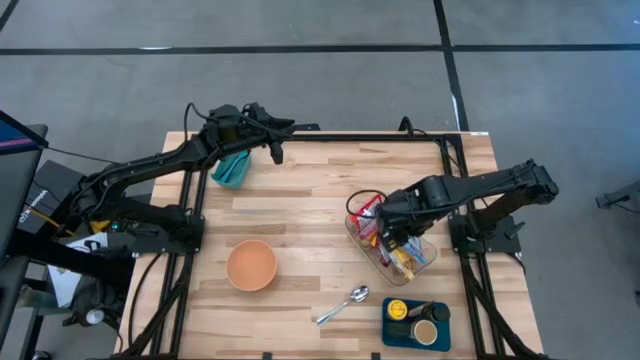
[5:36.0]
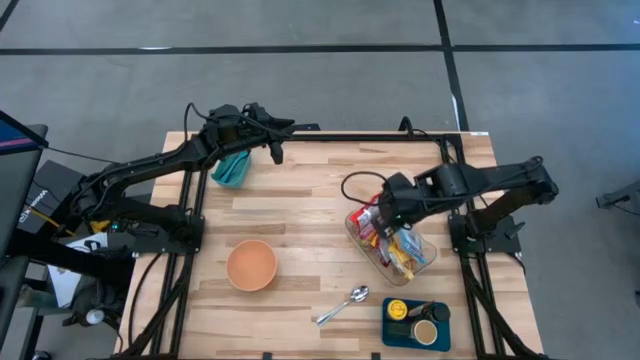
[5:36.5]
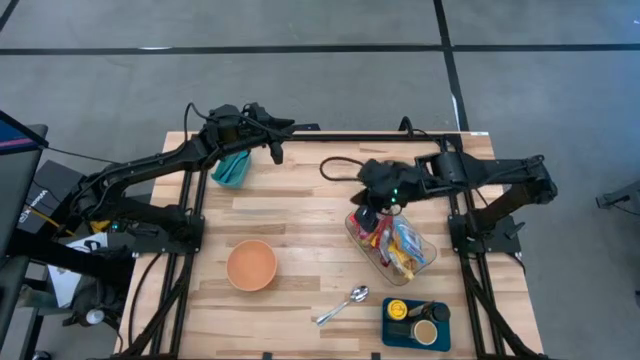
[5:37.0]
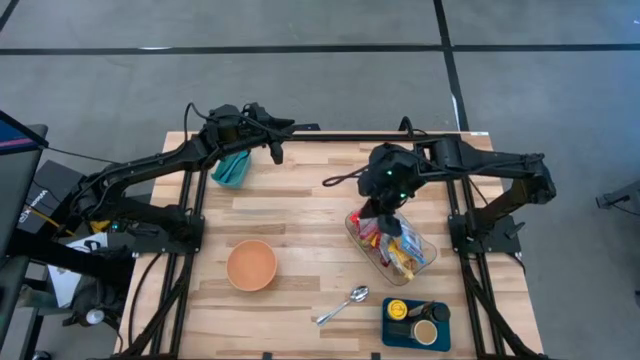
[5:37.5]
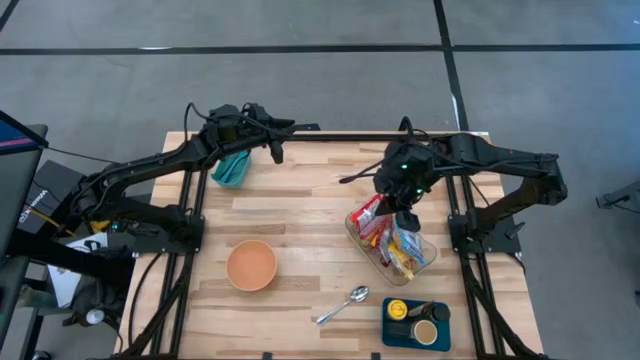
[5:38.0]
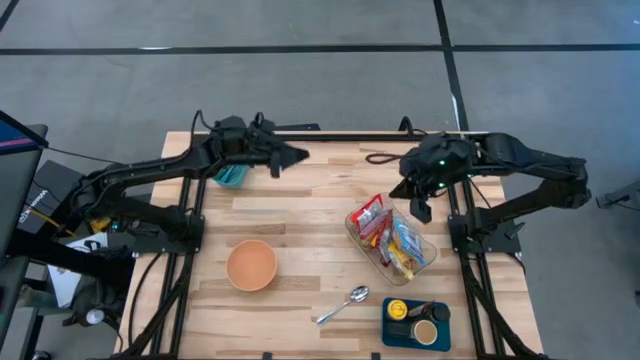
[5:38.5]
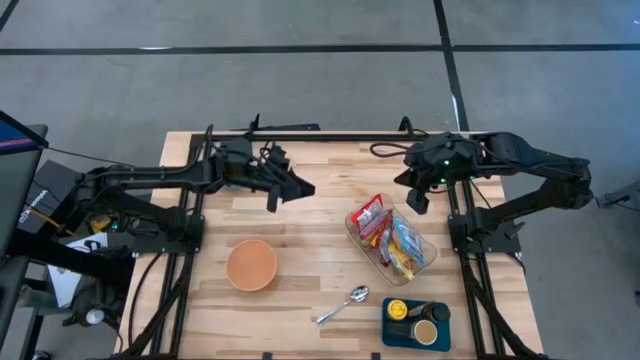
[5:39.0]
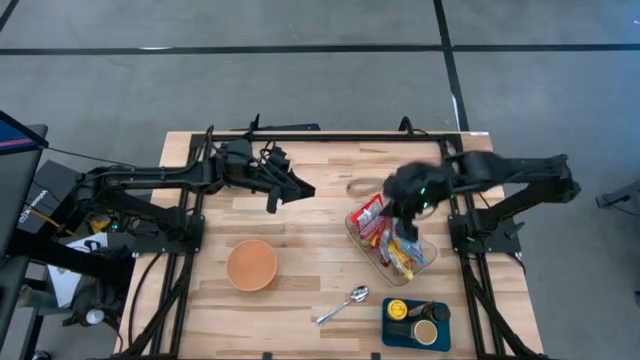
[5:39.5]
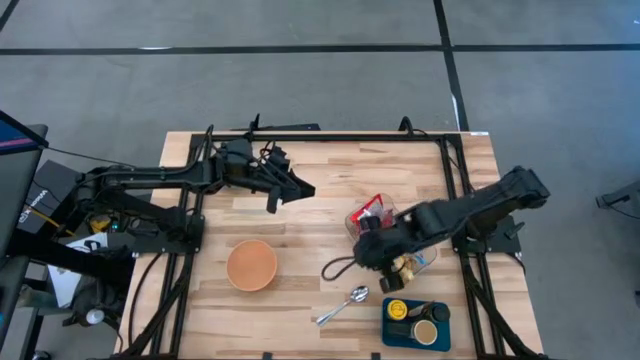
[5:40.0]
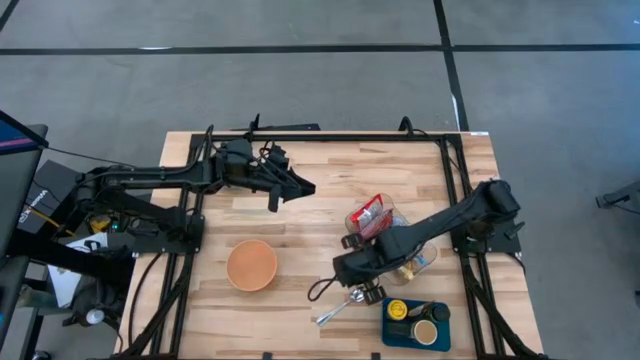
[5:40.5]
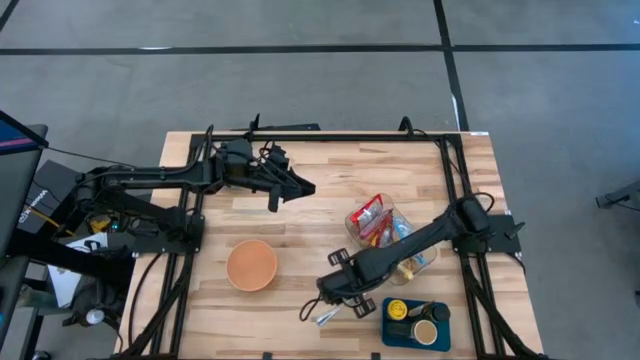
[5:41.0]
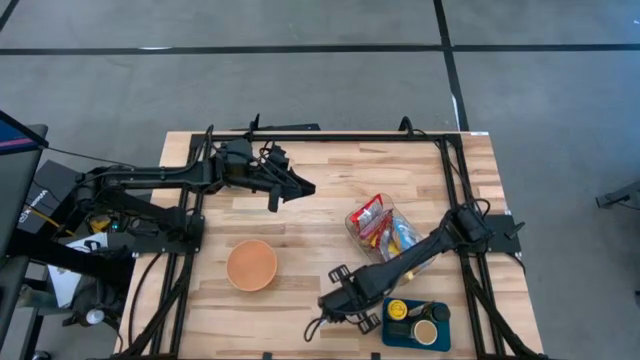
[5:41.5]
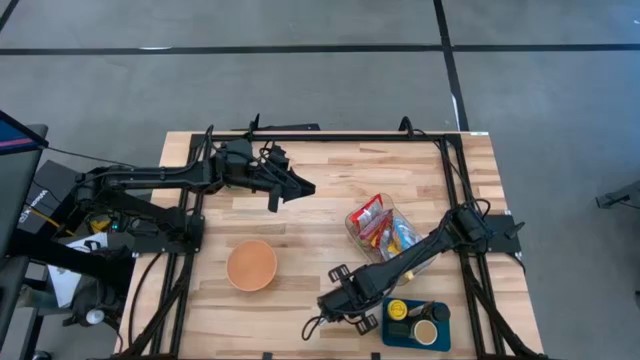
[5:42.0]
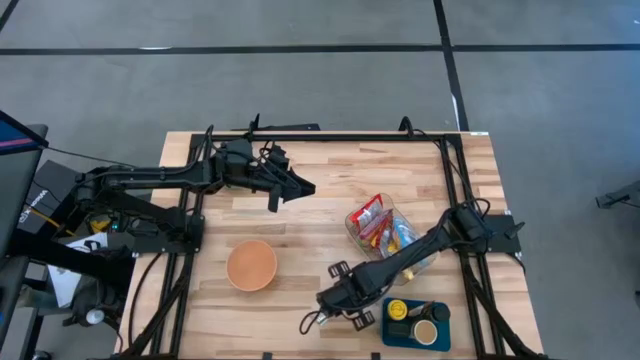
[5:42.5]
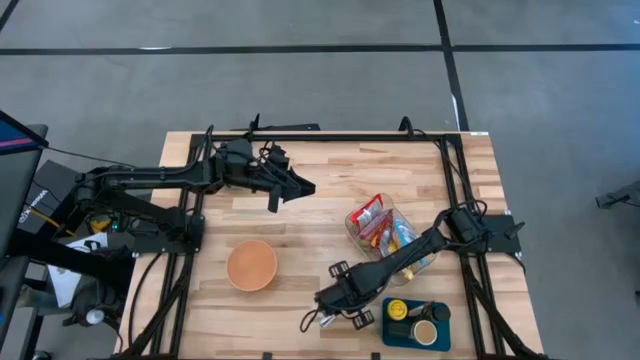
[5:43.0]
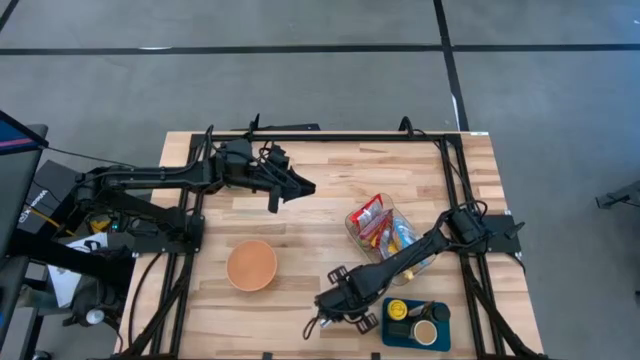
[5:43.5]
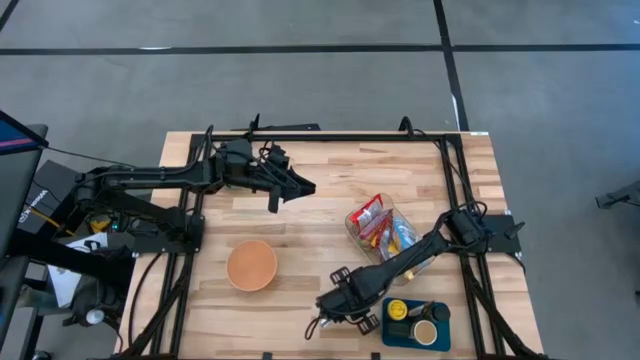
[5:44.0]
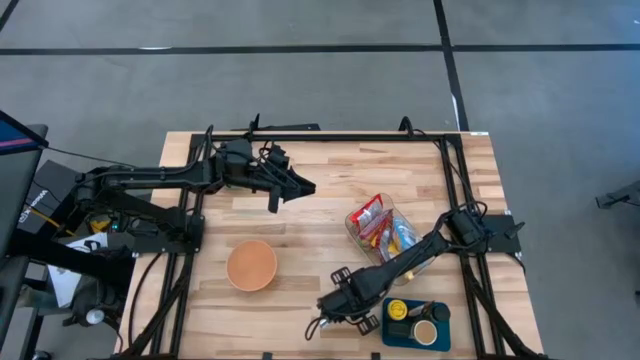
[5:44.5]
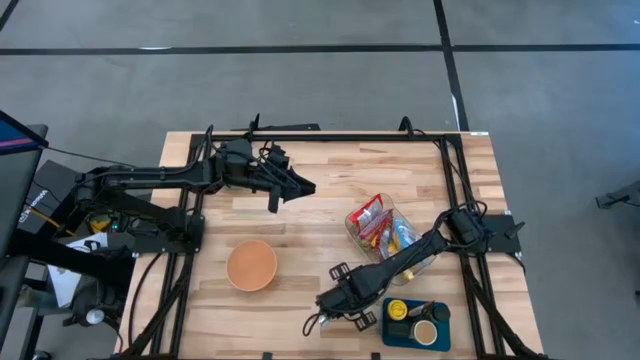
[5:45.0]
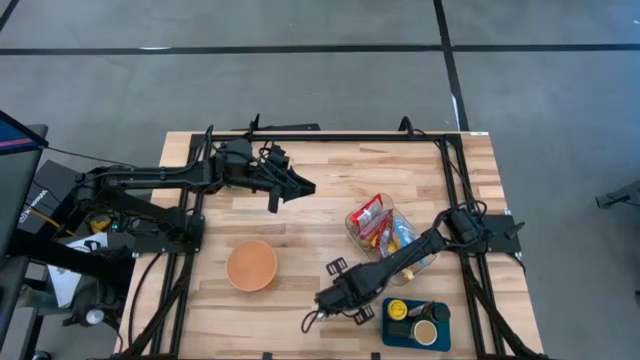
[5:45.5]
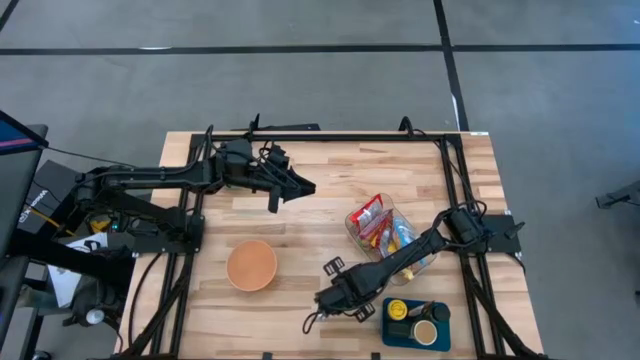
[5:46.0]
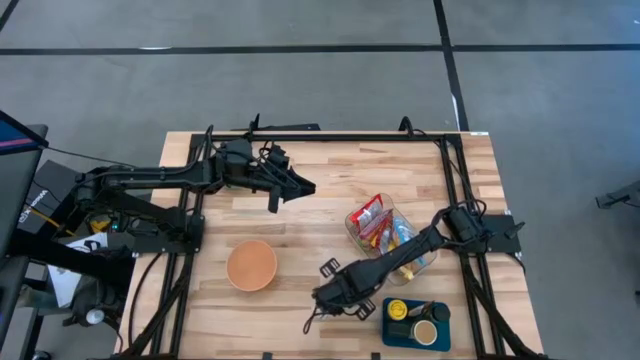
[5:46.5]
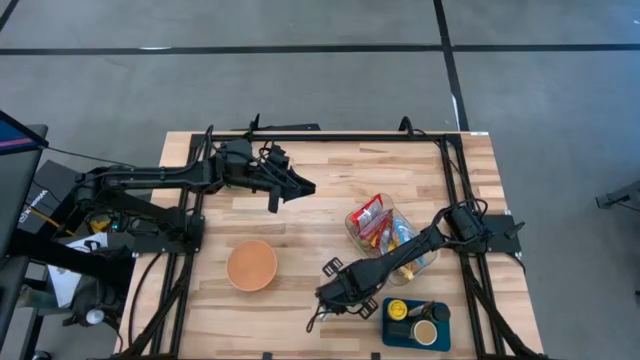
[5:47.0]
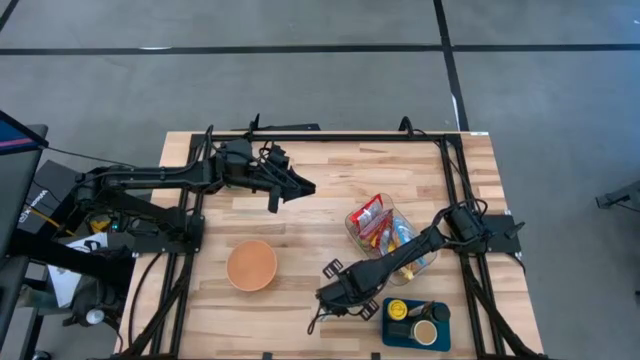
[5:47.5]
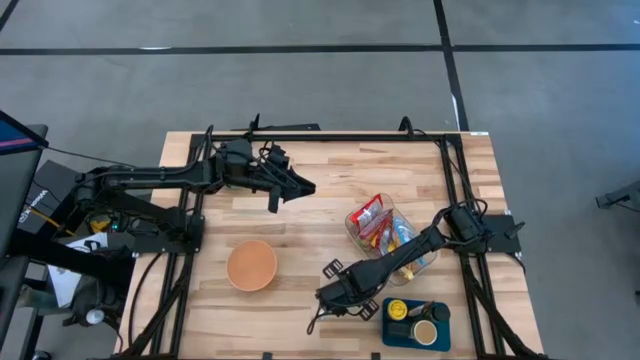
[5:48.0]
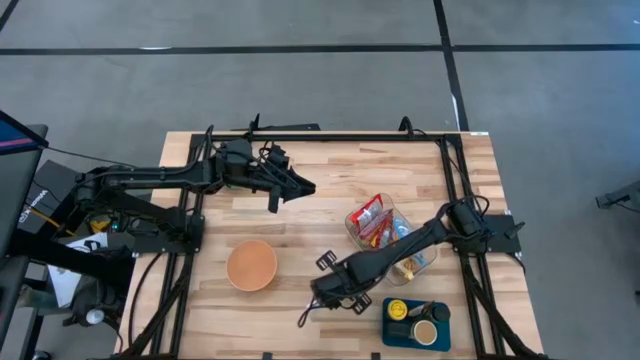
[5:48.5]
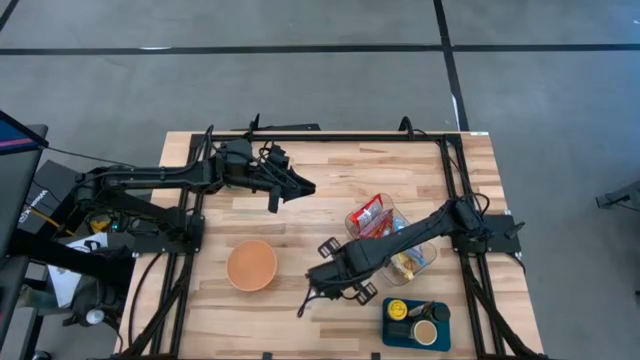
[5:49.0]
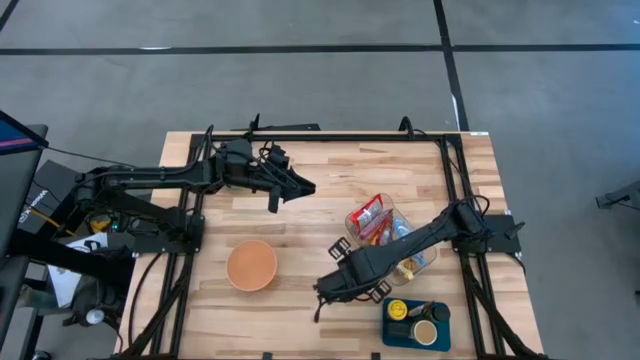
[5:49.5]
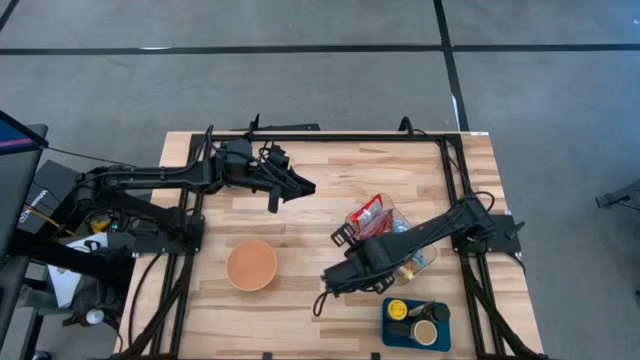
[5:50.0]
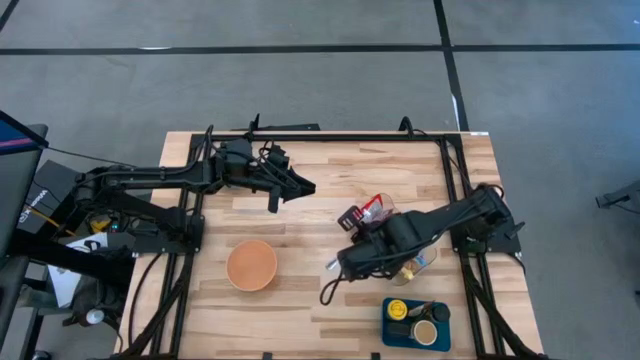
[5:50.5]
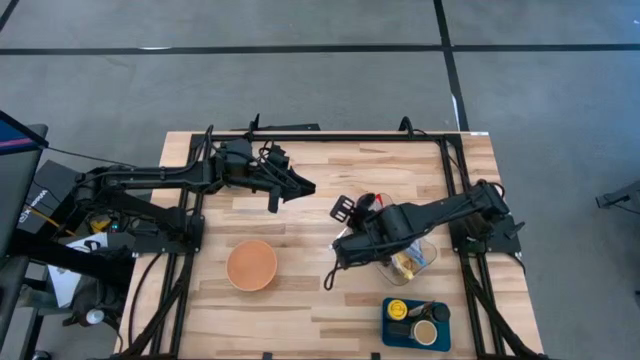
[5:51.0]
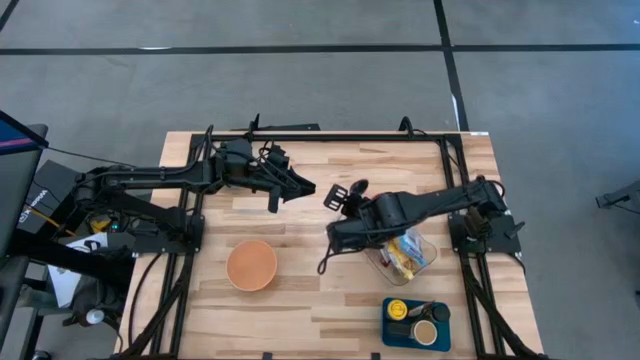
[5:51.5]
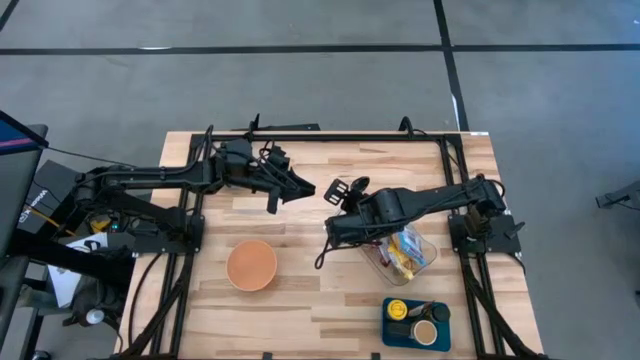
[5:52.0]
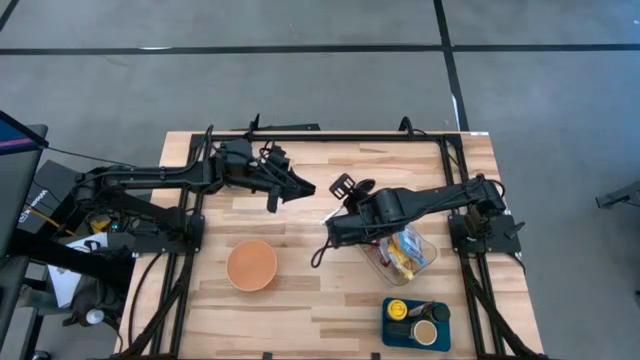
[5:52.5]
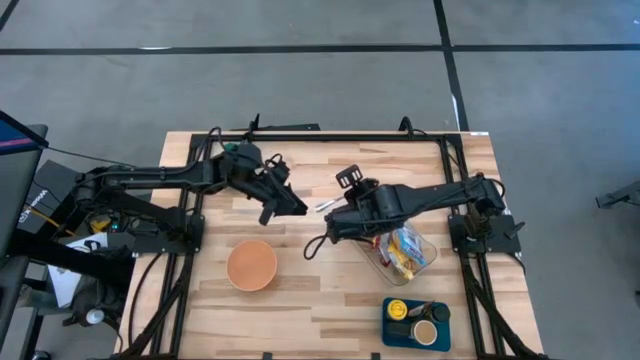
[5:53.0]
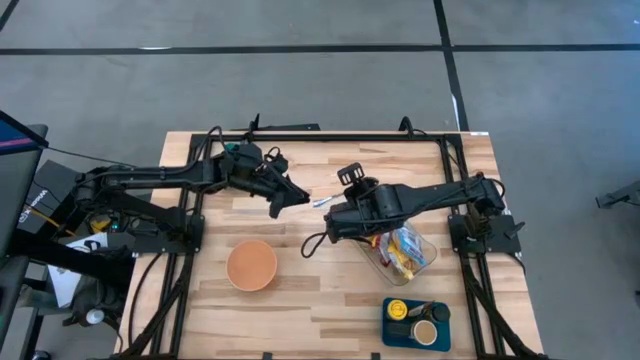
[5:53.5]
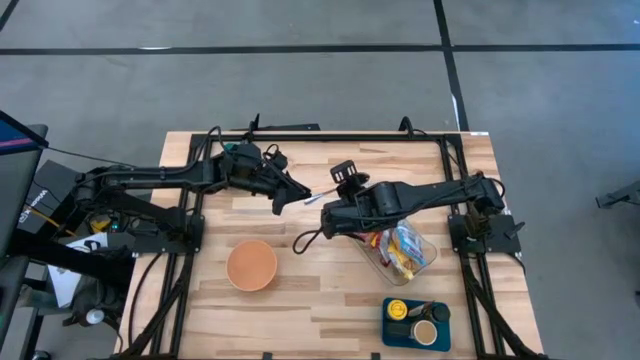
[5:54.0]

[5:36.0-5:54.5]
Task: Pick & Place Food Item
Put the silver spoon into the green bin

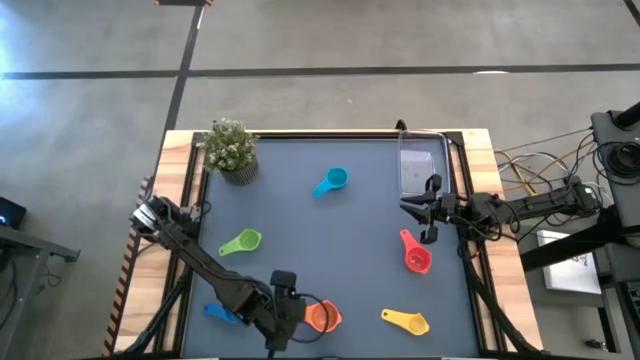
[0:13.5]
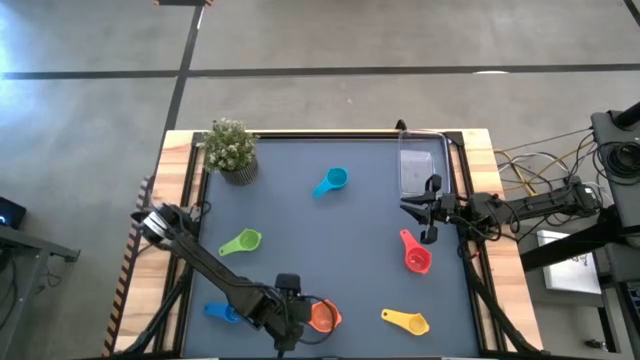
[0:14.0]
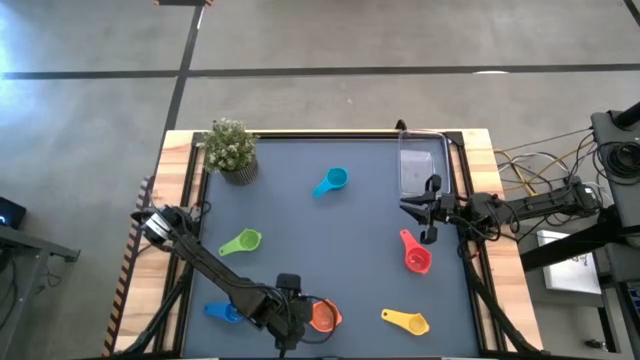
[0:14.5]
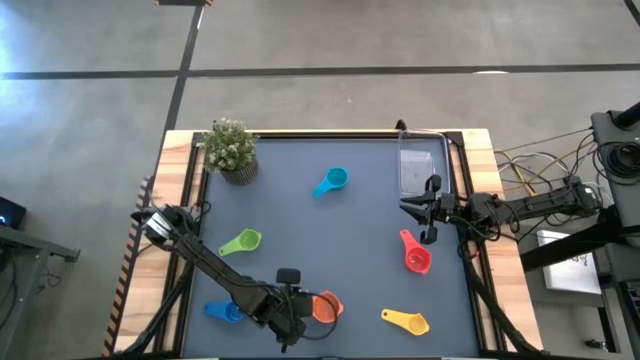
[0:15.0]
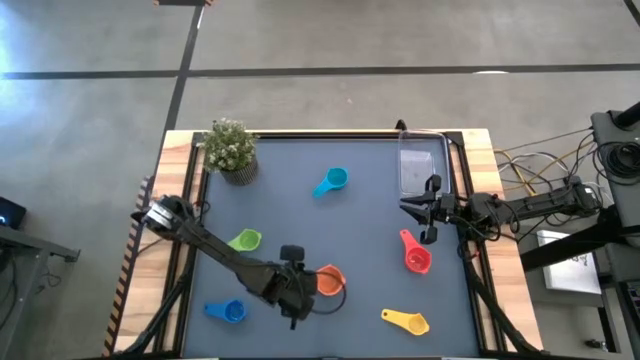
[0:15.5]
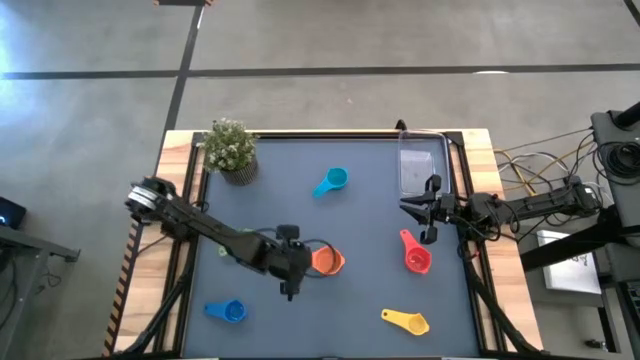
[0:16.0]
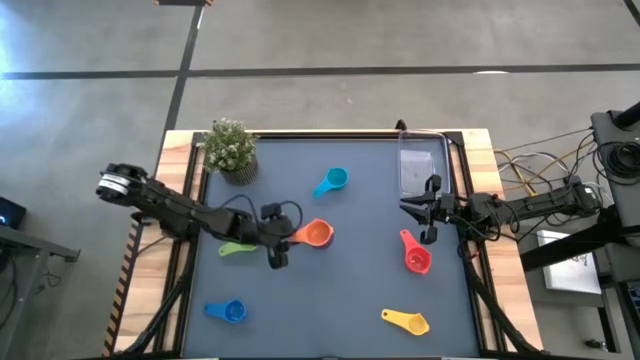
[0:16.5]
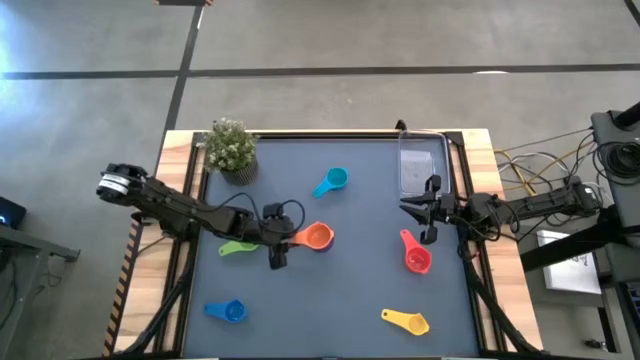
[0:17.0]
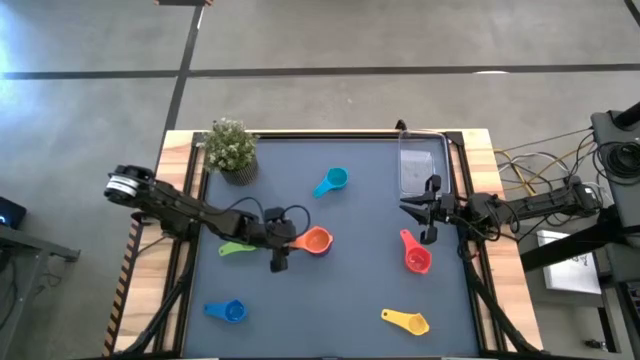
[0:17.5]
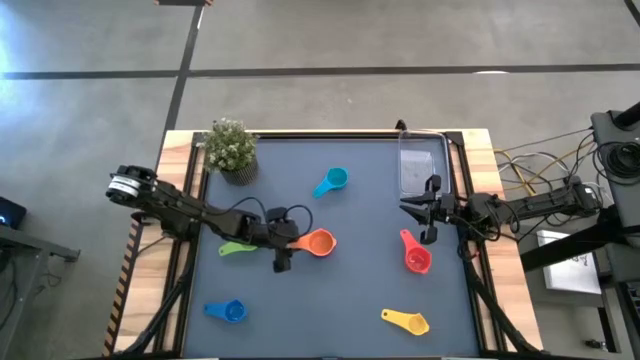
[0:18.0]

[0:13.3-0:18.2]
Task: Nest measuring cups in basket
Move the stacked measuring cups to the center of the table
